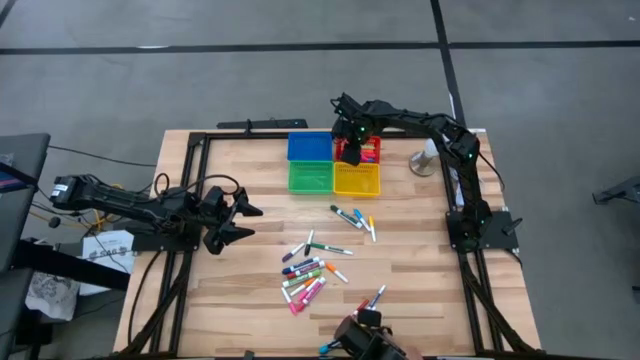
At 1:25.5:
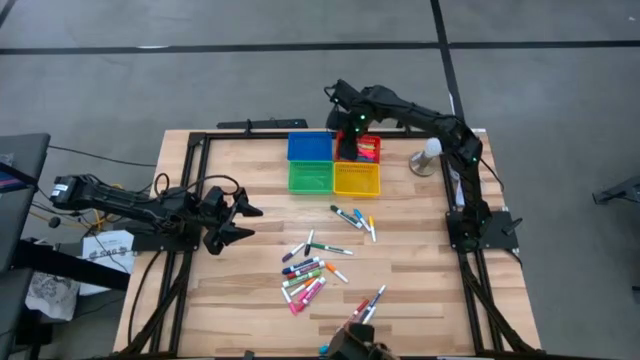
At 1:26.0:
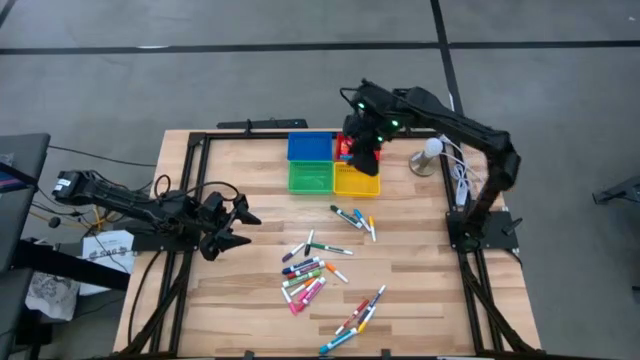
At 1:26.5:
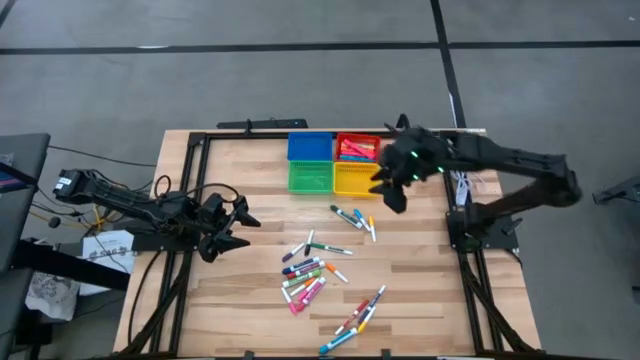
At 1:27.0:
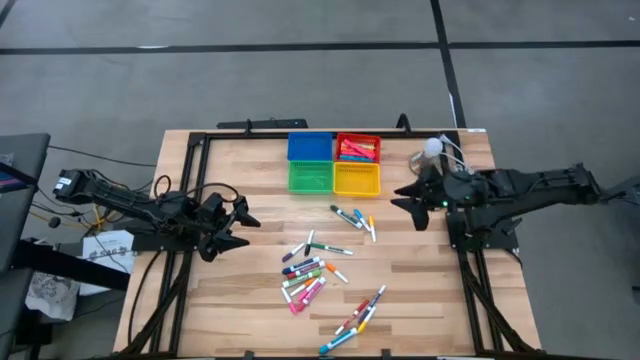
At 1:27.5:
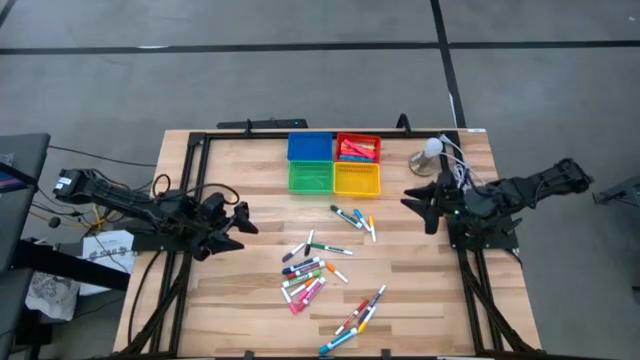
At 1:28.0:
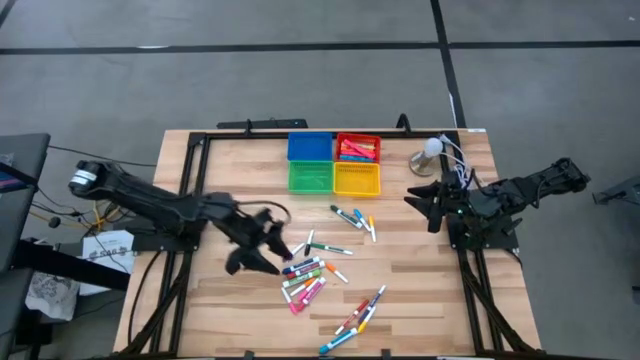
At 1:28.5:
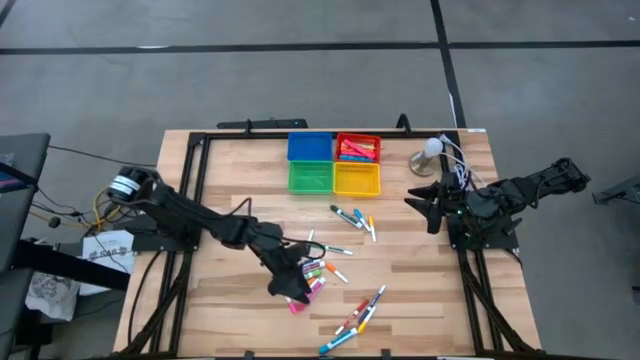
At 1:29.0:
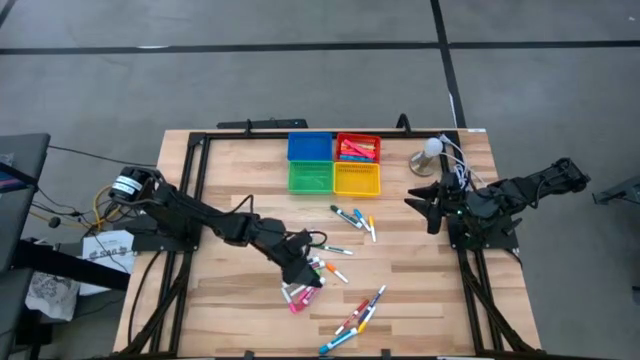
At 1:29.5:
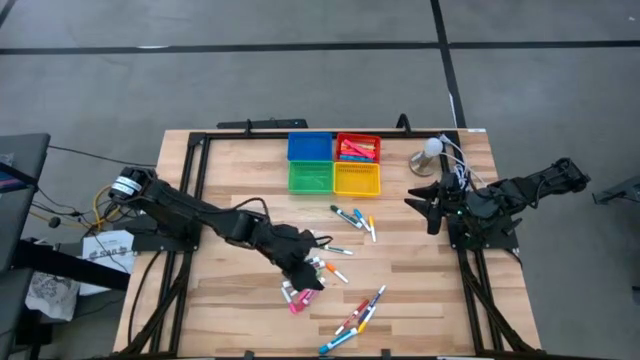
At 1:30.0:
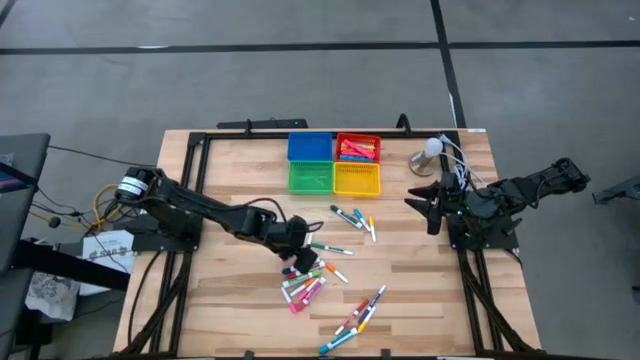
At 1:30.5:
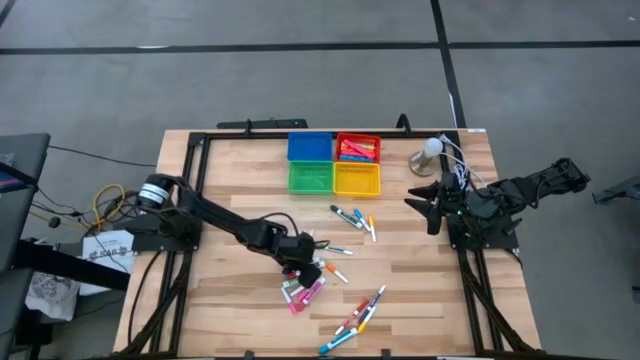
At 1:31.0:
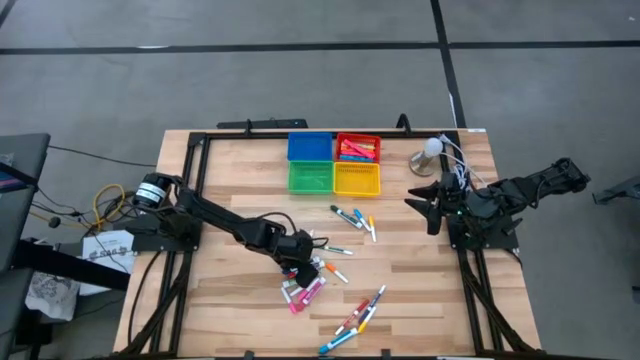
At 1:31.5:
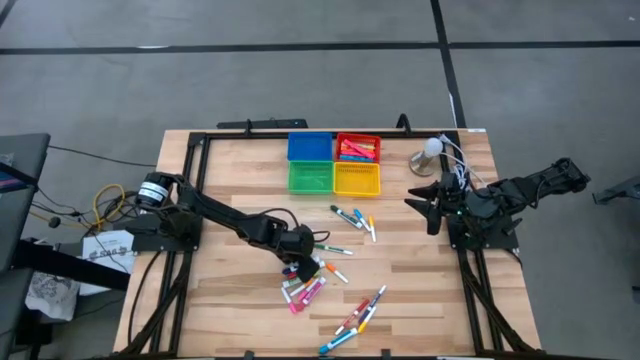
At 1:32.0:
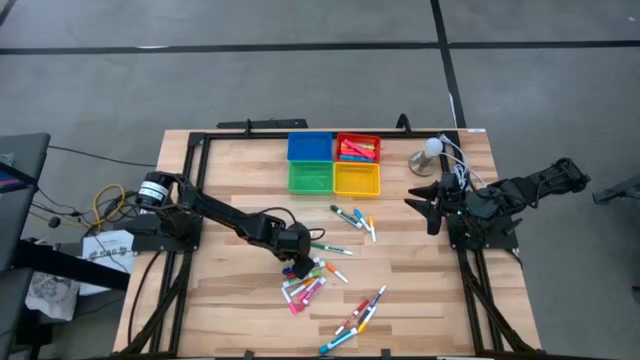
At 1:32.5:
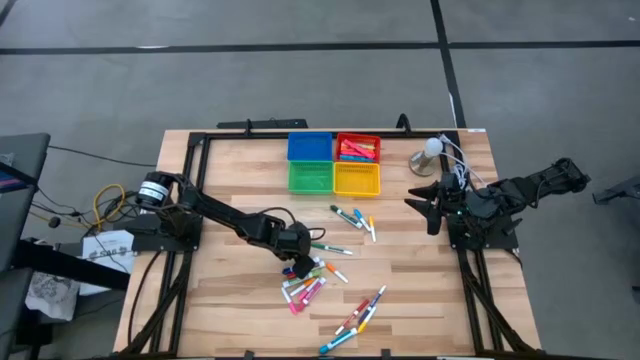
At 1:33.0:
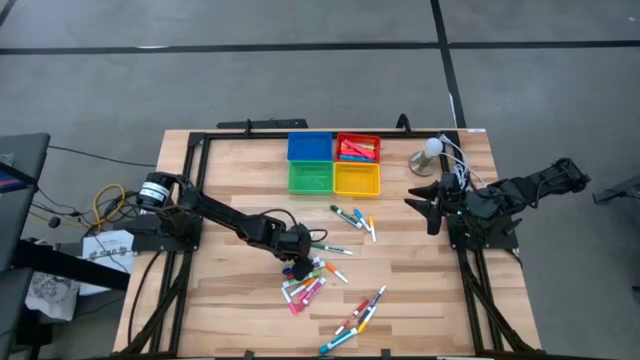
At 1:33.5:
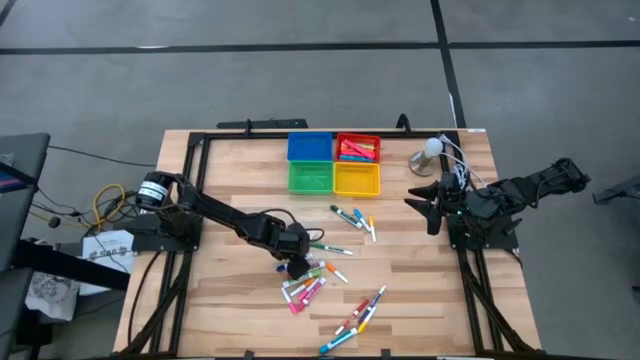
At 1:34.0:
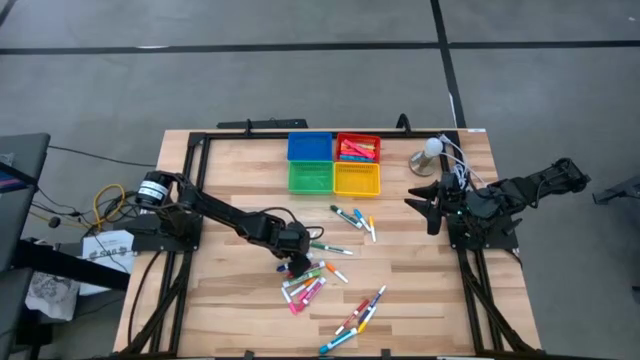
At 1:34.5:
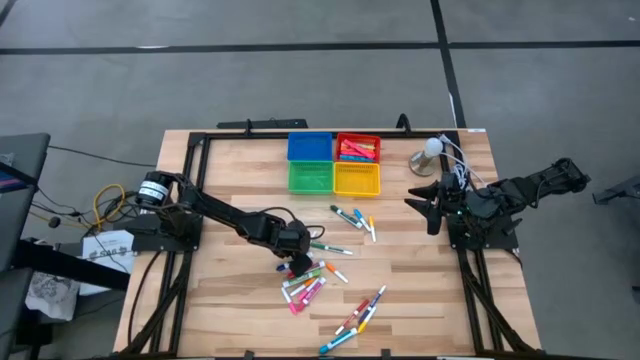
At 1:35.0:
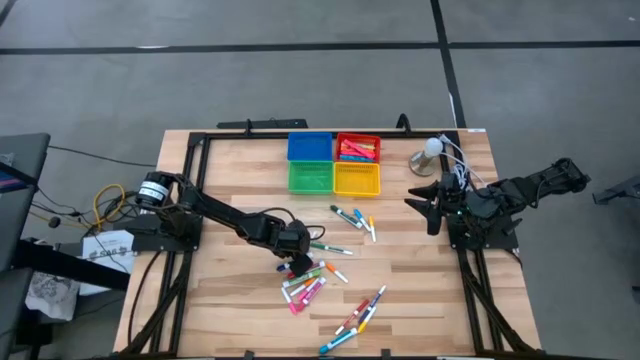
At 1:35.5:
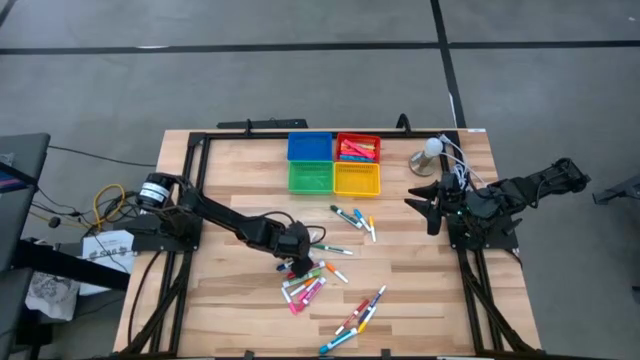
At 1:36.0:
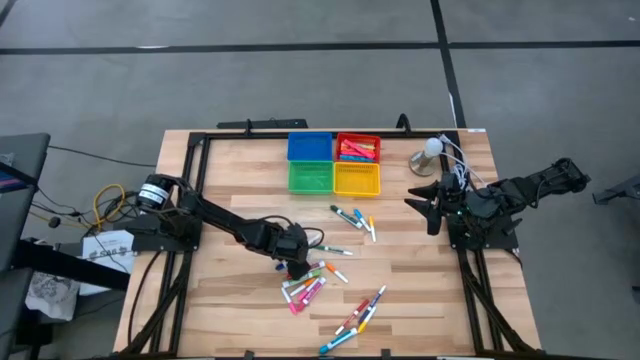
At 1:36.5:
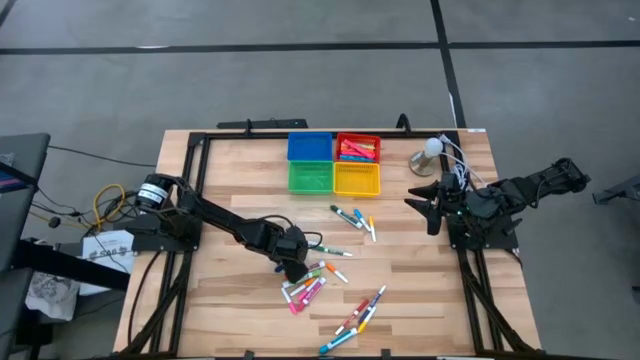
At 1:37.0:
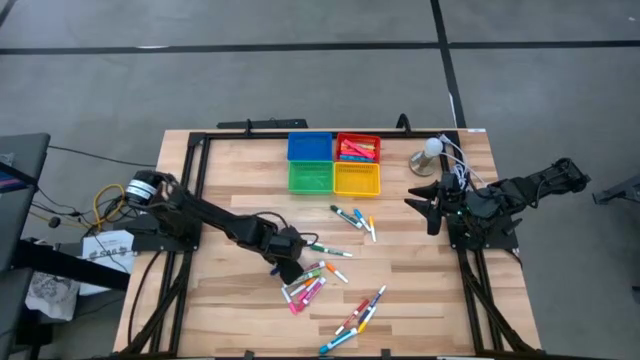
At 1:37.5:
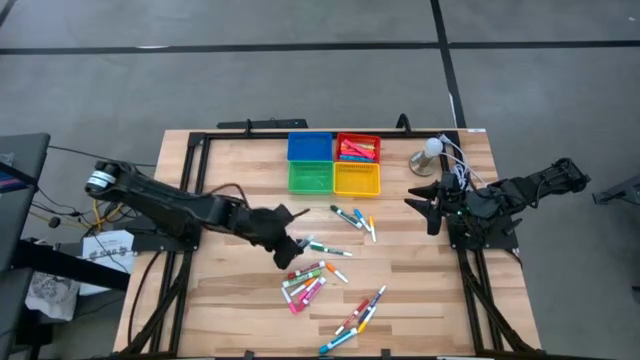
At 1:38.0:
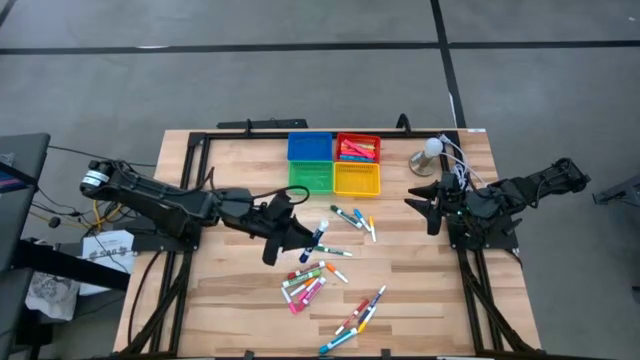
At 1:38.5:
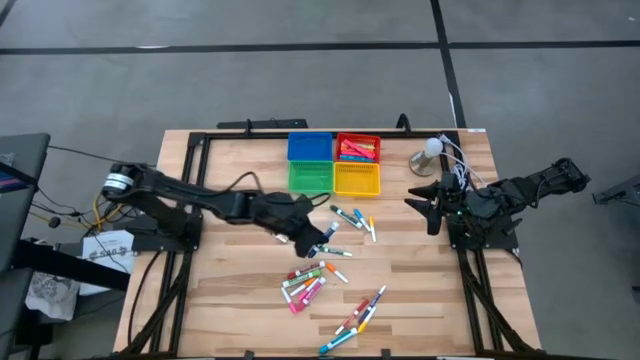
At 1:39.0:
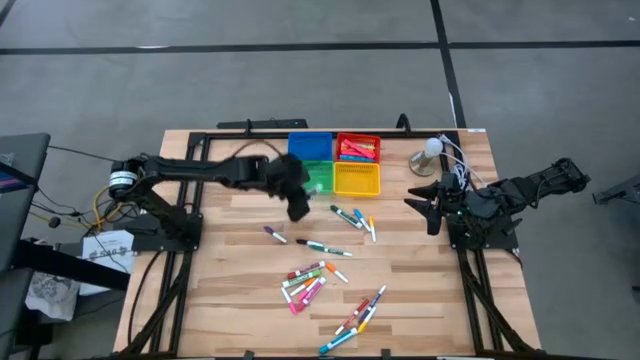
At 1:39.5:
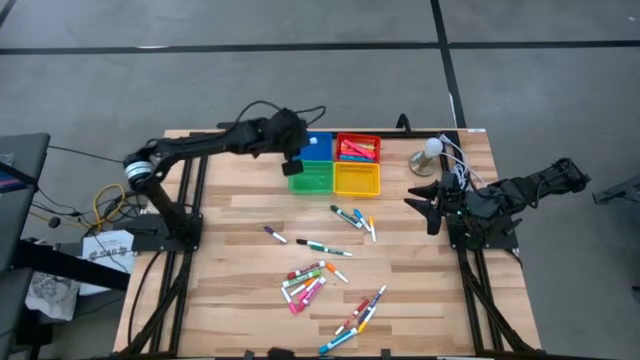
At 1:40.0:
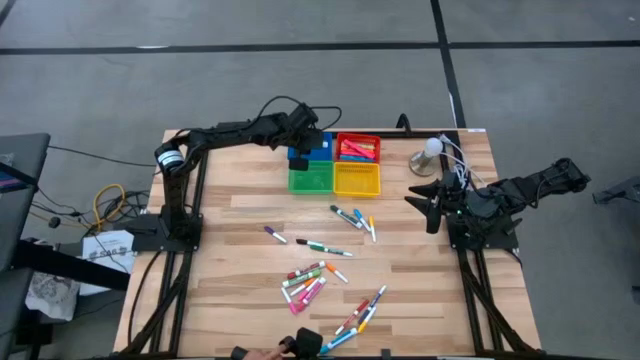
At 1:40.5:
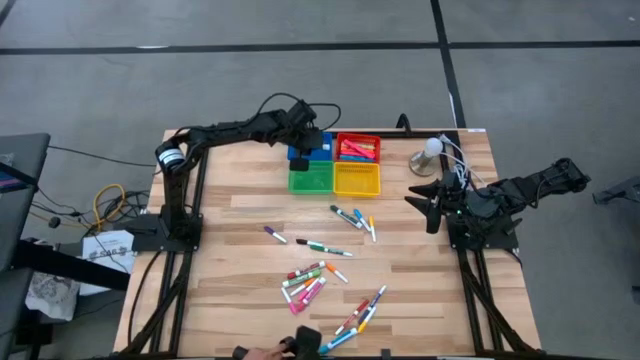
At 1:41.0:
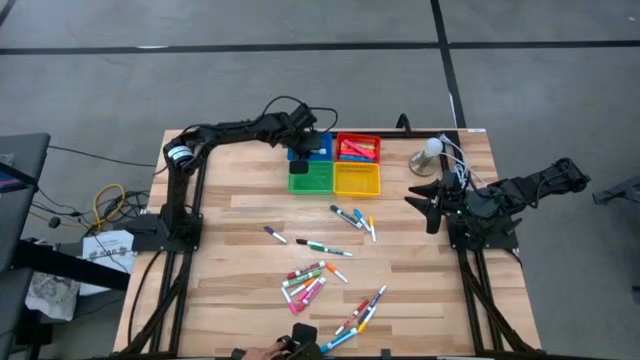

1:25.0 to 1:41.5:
Task: Pick & Place Markers
Put the dark blue highlighter in the blue bin

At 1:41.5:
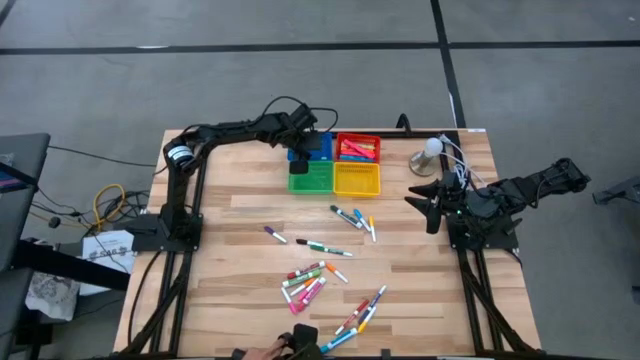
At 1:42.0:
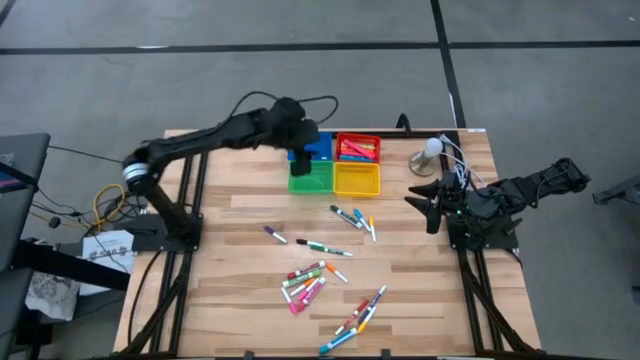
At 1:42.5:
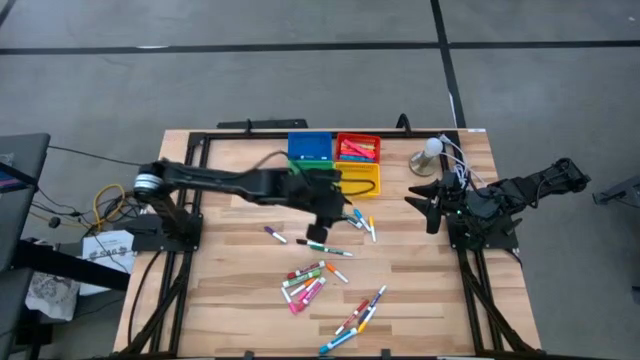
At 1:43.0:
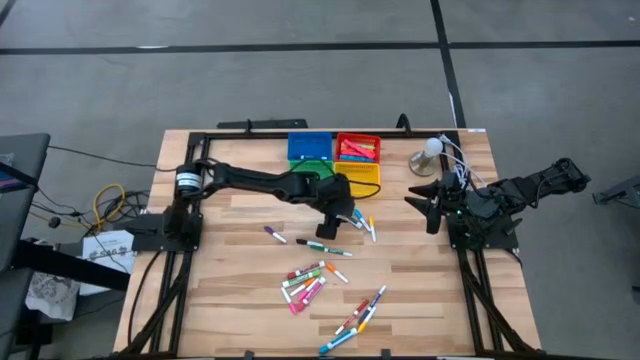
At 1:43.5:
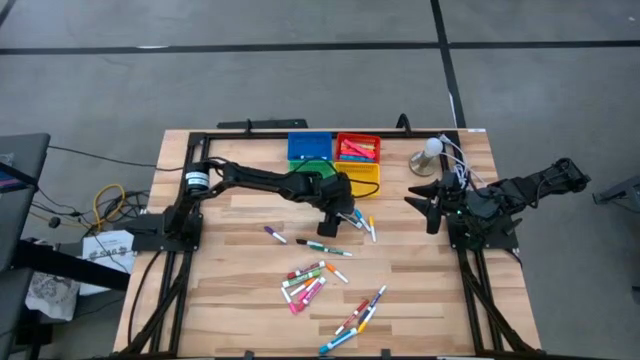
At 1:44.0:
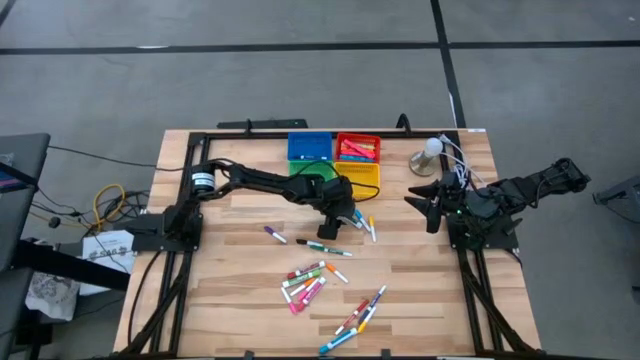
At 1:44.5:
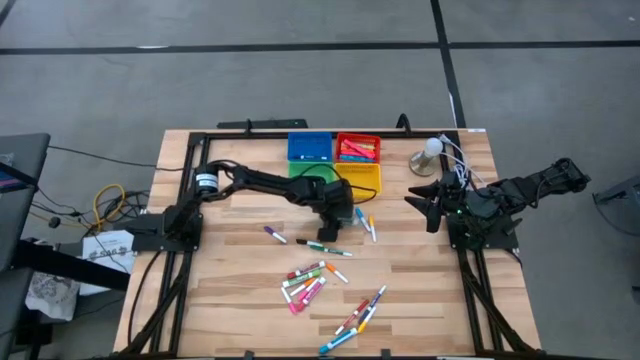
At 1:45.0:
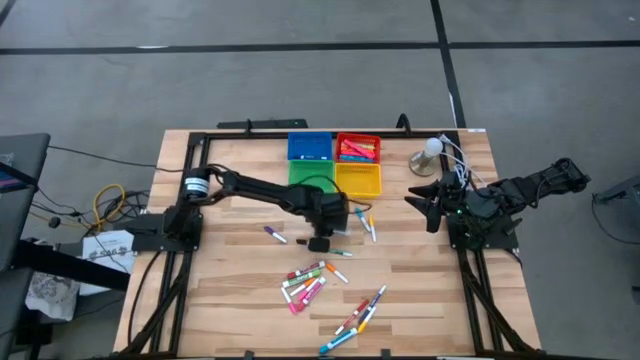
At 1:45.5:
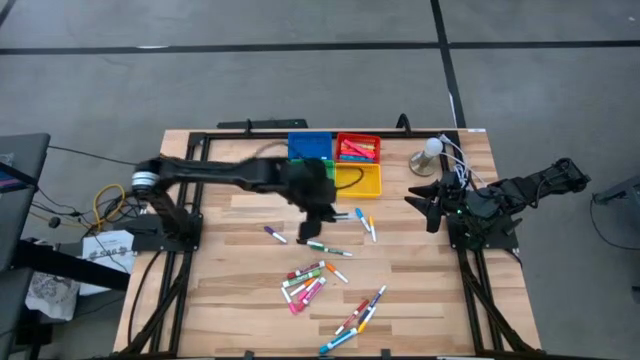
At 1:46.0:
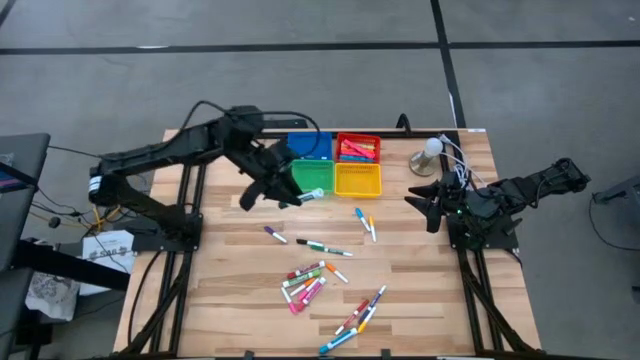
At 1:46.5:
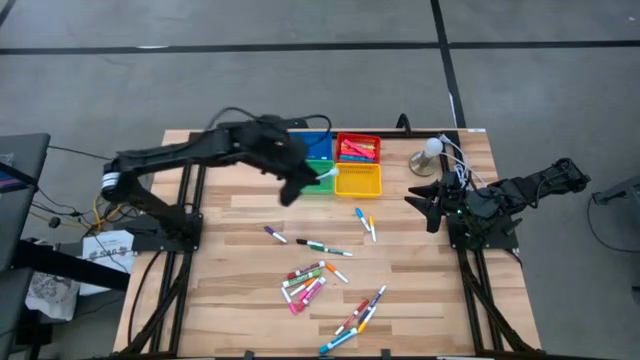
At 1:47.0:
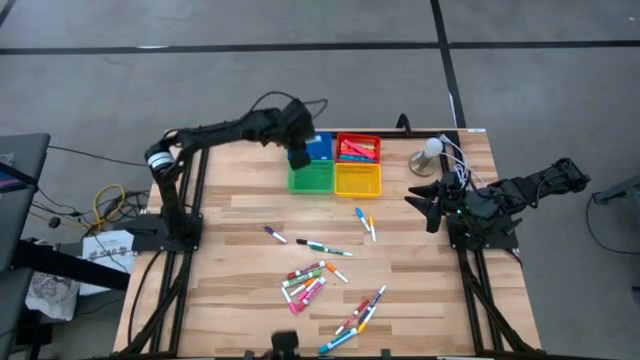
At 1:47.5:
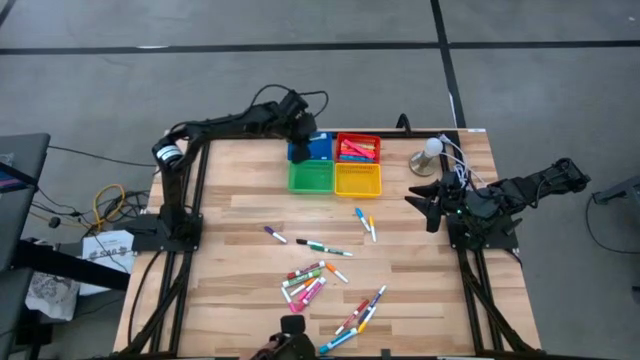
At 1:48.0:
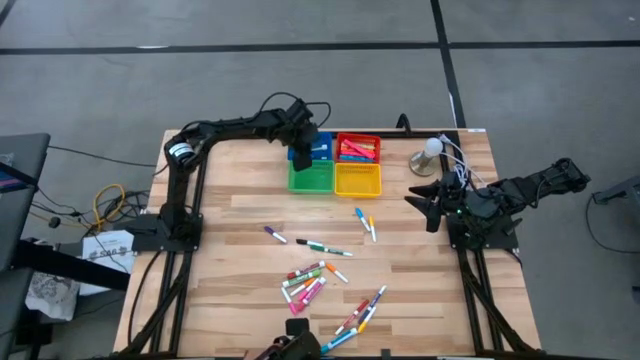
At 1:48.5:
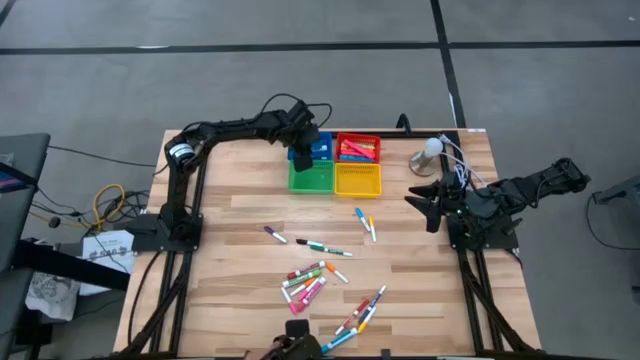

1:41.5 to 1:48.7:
Put the dark green highlighter in the blue bin
